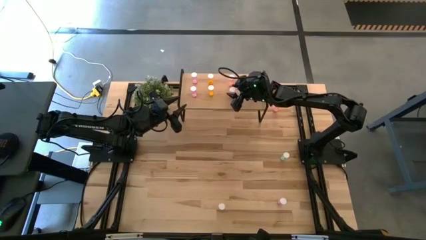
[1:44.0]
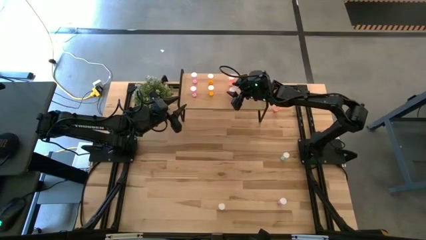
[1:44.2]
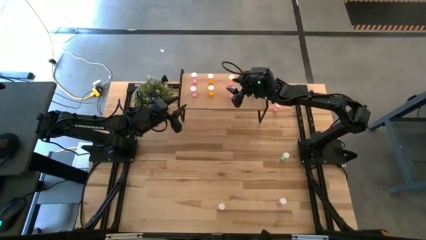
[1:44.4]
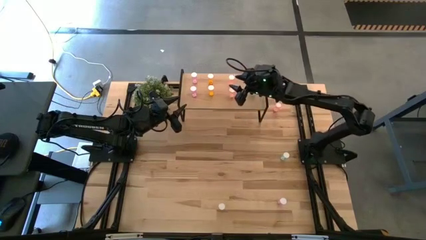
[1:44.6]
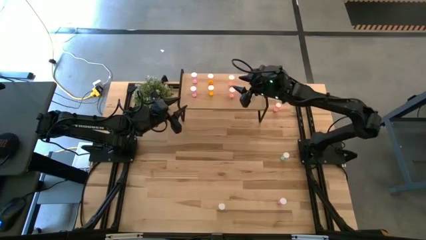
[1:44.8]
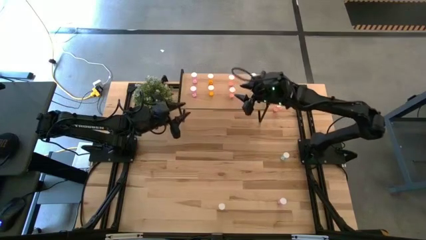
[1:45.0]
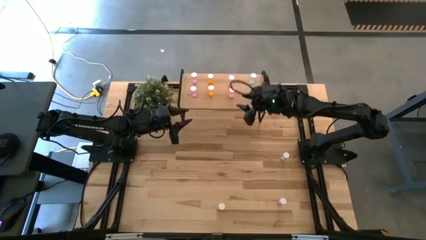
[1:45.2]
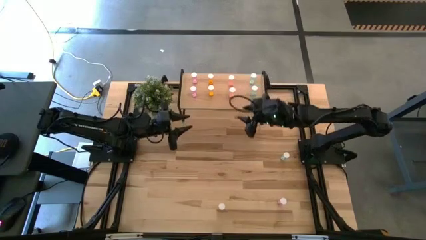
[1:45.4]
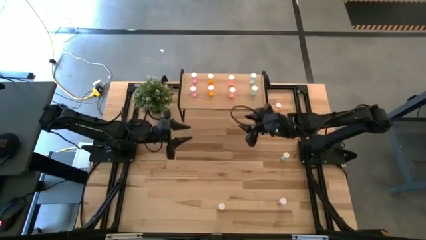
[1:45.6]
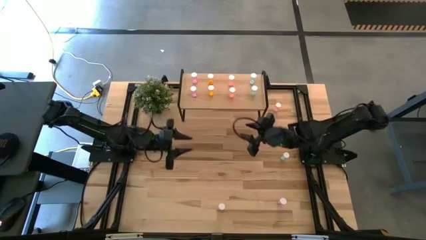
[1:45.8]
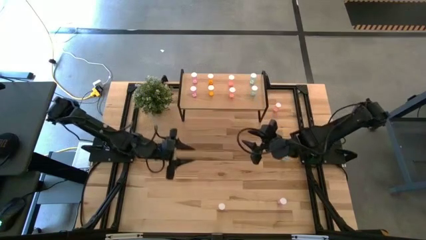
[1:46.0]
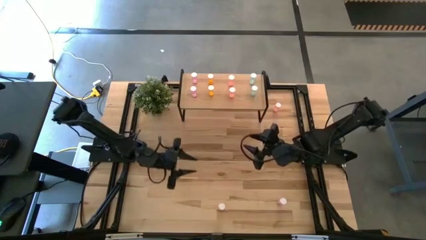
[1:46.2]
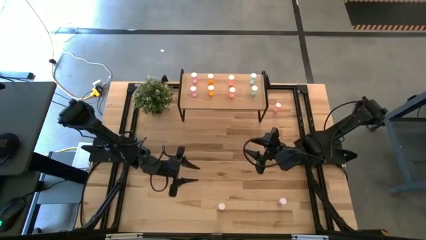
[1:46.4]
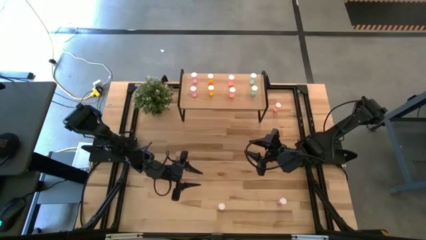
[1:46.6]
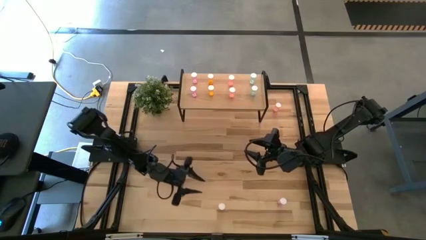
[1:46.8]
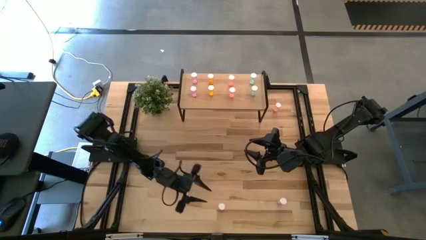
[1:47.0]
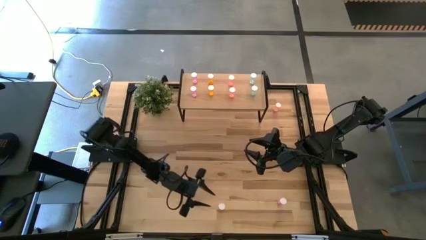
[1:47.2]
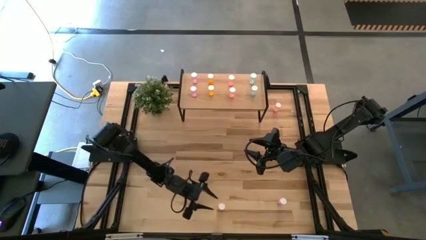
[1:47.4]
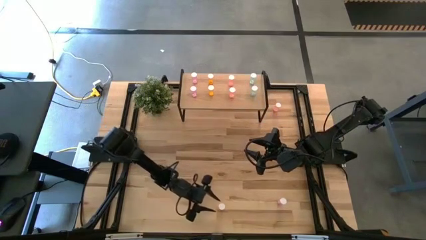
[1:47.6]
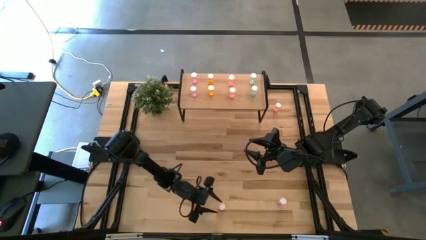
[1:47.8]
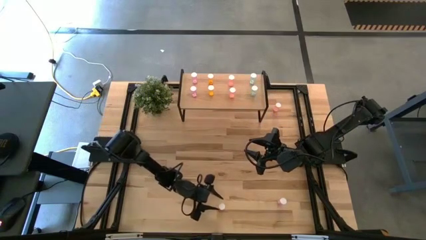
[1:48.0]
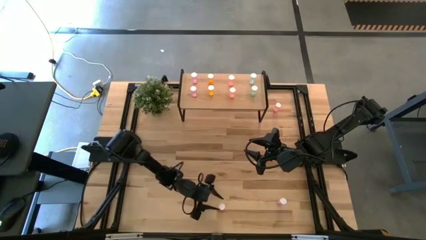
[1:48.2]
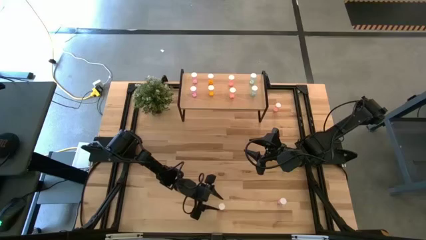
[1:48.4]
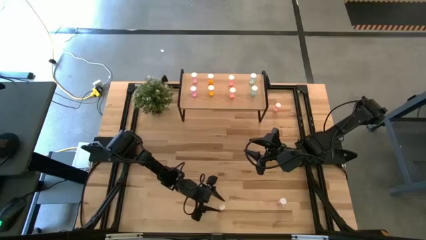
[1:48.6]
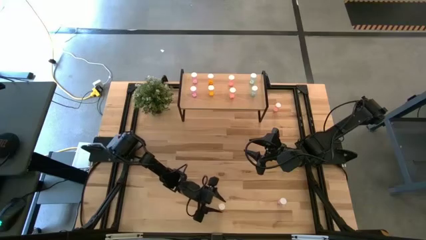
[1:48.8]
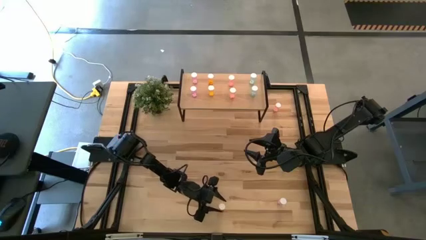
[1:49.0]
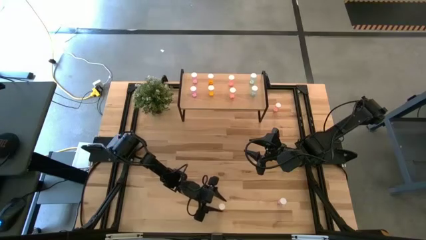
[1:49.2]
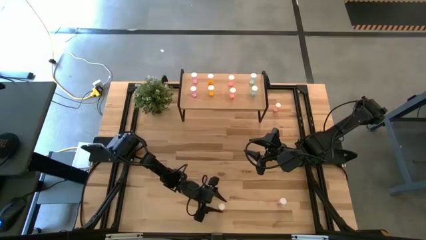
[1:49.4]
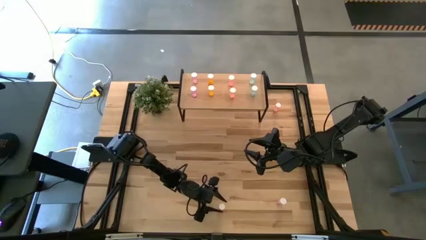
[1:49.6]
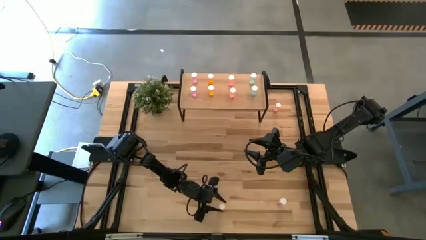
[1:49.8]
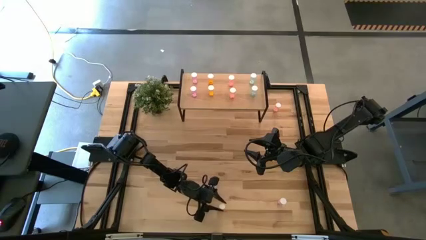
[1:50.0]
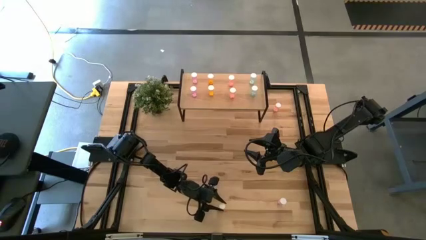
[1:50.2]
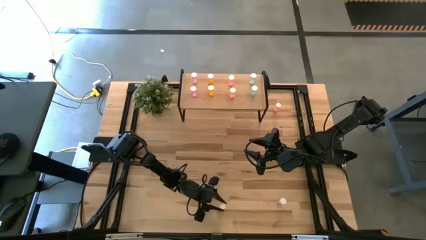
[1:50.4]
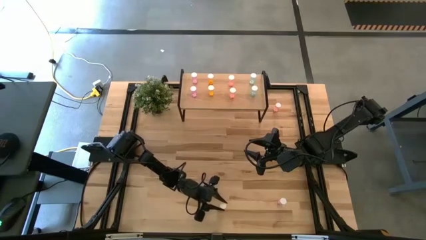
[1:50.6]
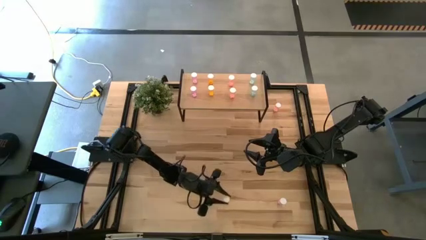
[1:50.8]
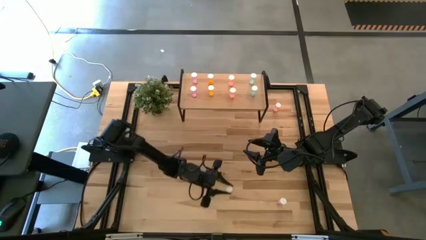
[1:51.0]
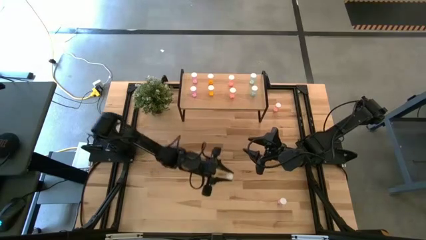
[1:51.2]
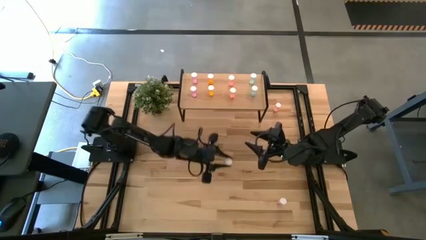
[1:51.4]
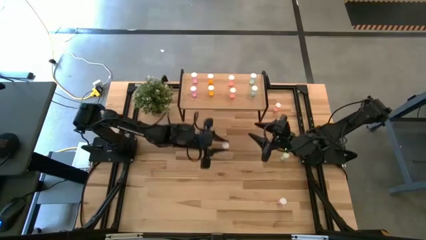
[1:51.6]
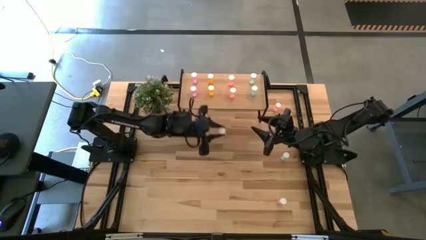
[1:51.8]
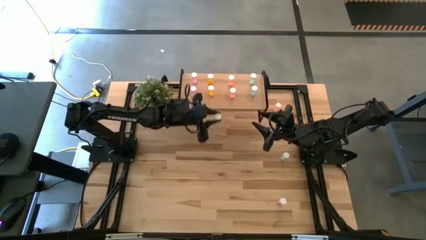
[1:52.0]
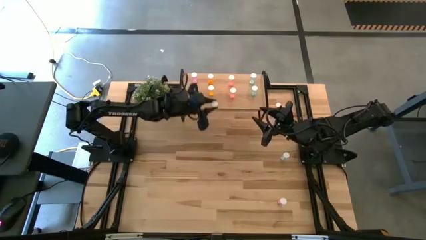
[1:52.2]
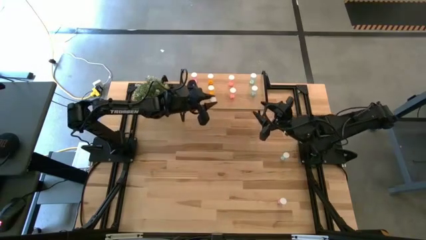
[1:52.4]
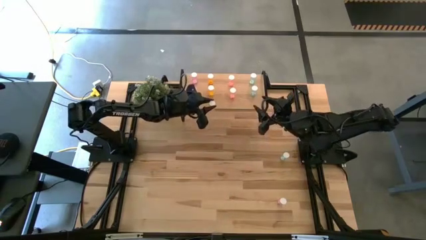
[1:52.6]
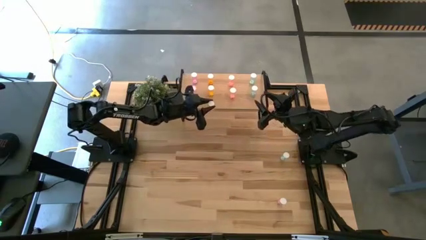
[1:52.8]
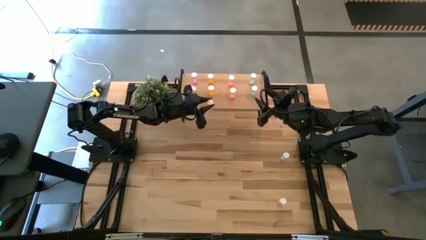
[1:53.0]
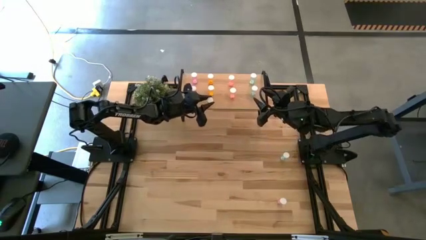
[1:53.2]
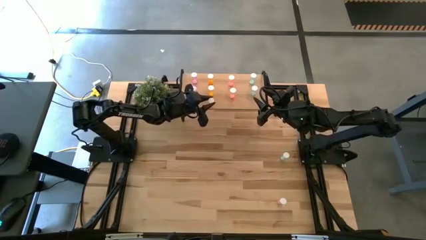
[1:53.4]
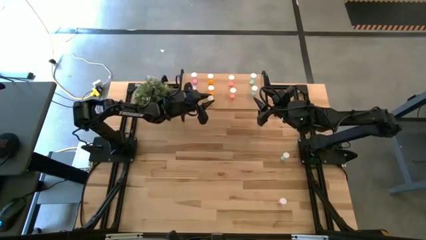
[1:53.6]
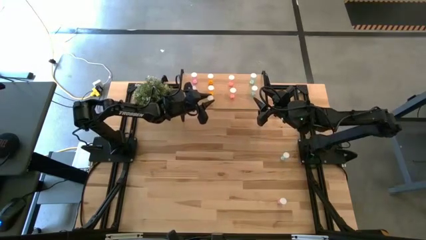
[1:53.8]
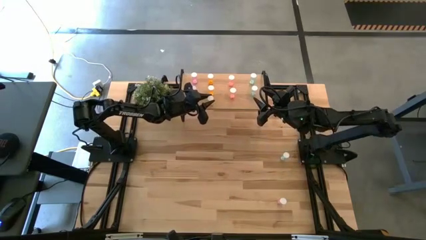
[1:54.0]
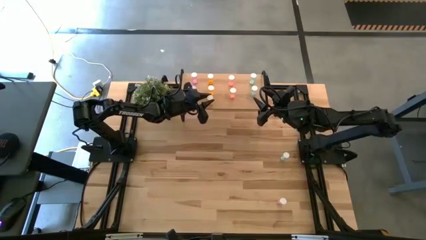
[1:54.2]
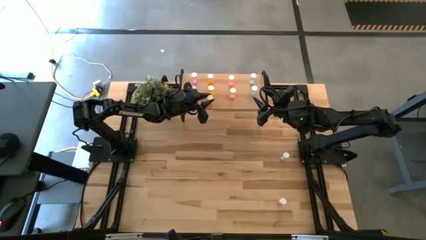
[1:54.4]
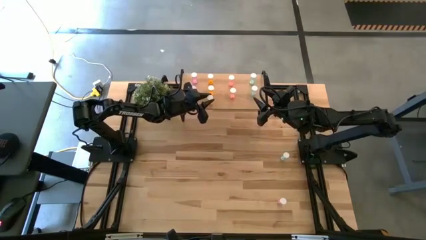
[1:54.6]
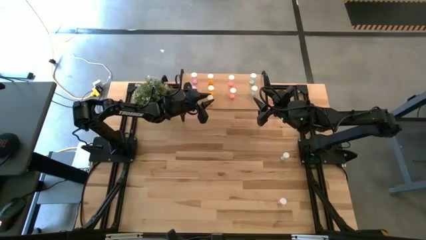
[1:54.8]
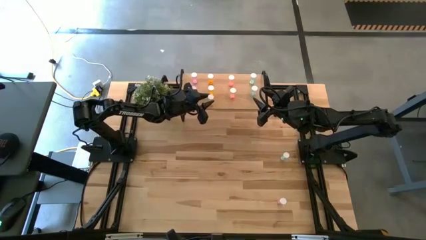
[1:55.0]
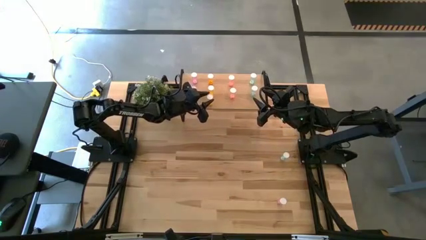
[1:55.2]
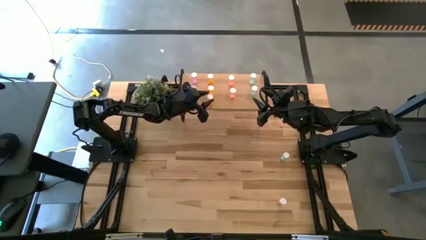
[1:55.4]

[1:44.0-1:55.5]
Task: Pick and place medicine bottles onto shelf by color
Put the orange pill bottle aligned with the other orange pill bottles on the shelf
